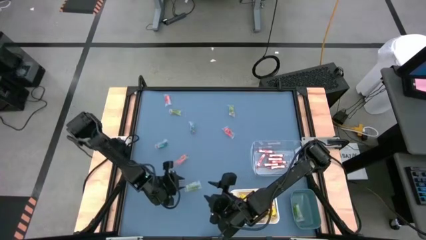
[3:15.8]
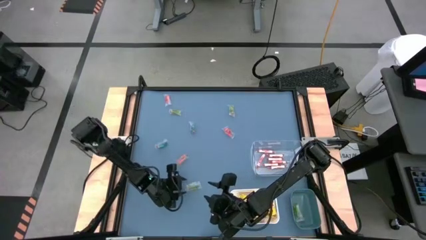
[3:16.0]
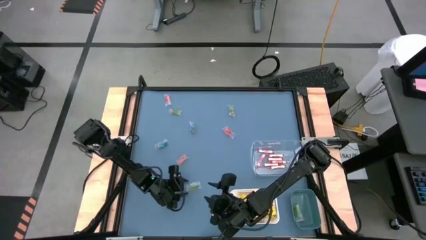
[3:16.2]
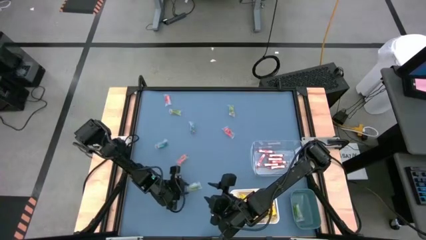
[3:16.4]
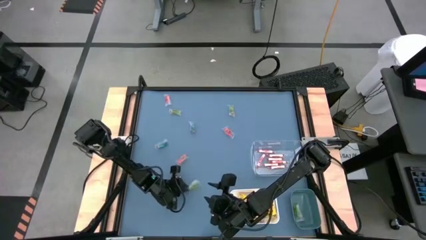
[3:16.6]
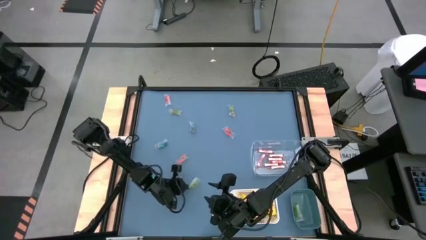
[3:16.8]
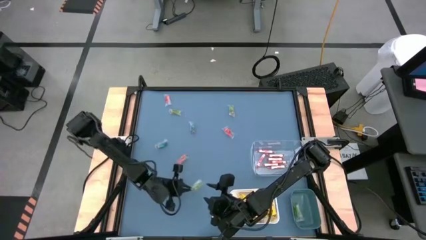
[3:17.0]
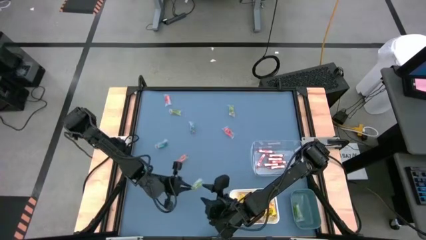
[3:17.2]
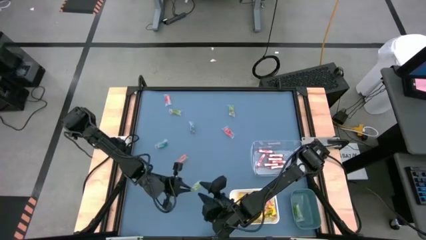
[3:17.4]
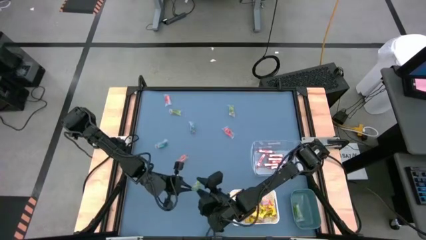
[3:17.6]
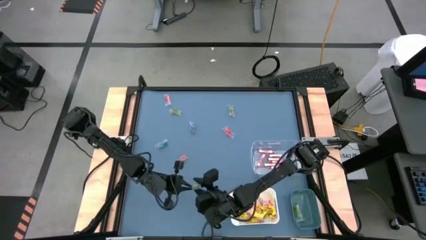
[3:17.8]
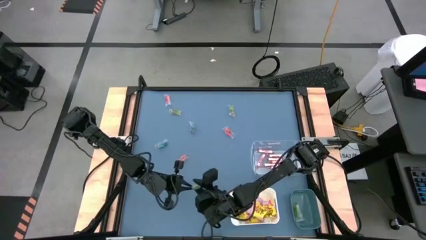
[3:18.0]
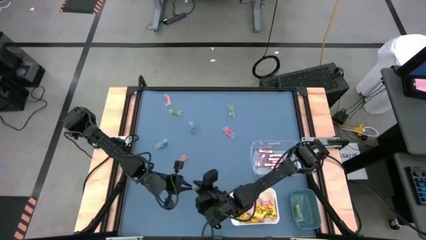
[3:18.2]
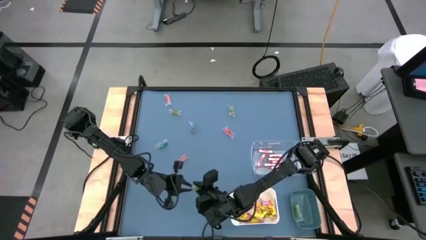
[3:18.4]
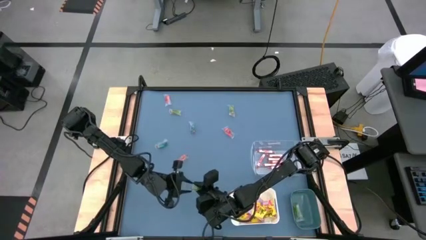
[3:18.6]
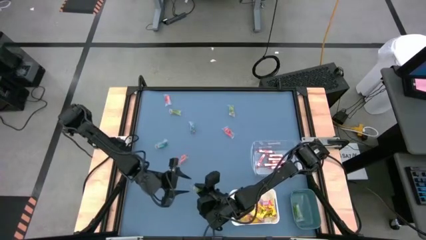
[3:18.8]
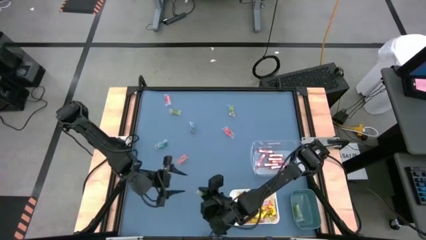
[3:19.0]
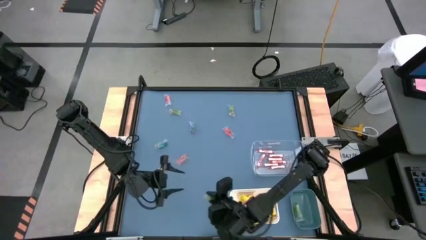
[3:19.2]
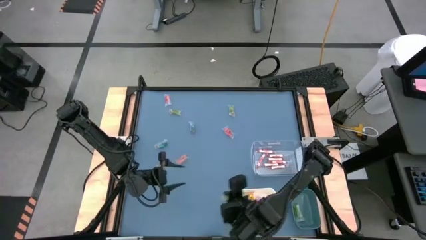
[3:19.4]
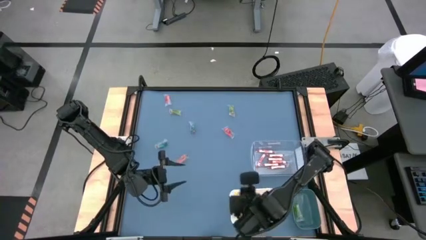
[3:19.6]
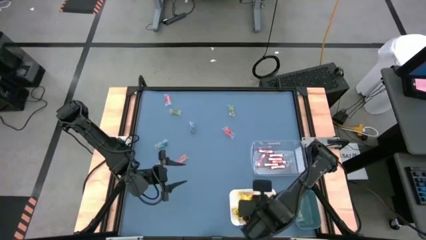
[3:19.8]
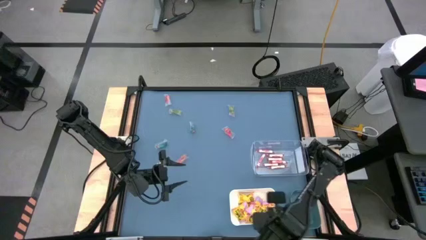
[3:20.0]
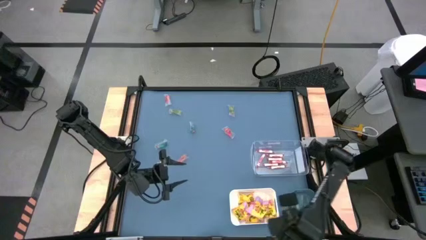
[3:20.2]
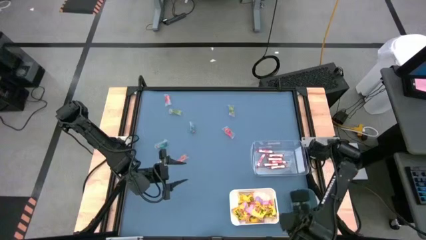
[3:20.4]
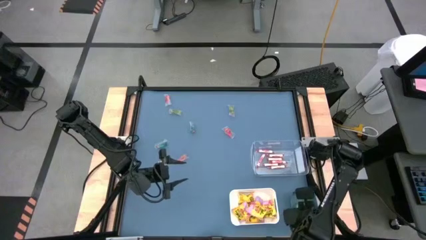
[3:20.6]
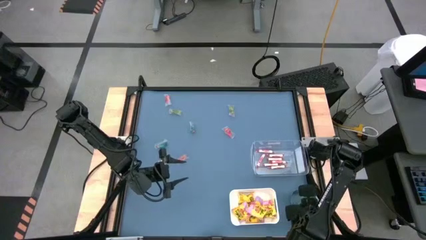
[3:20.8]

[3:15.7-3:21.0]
Task: Sort candy
Put the green gummy into the blue bin

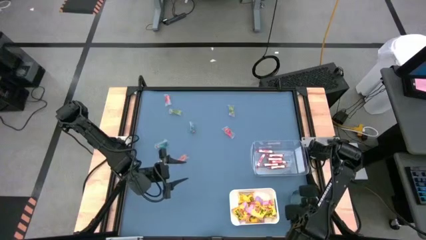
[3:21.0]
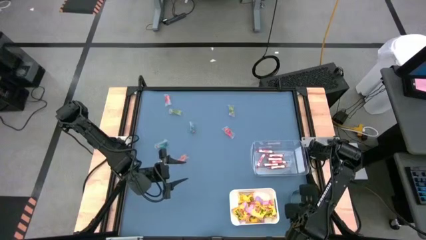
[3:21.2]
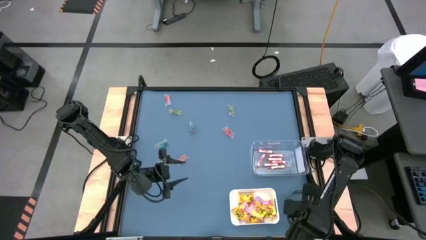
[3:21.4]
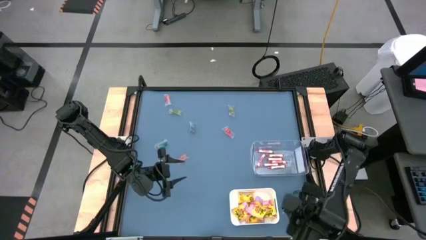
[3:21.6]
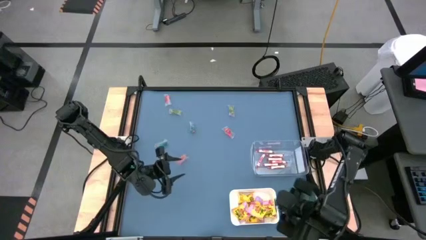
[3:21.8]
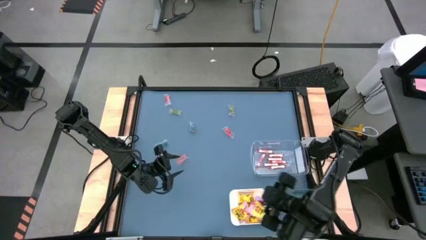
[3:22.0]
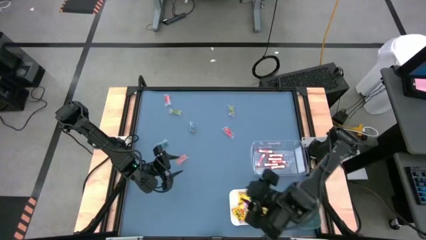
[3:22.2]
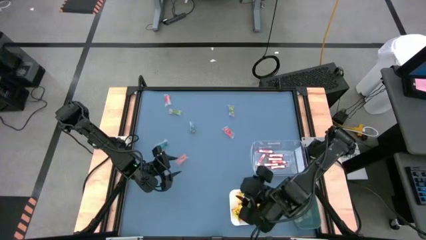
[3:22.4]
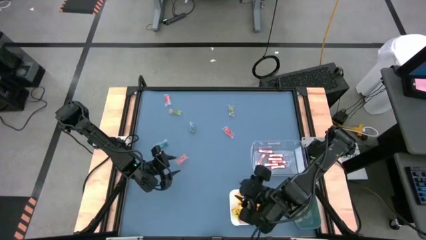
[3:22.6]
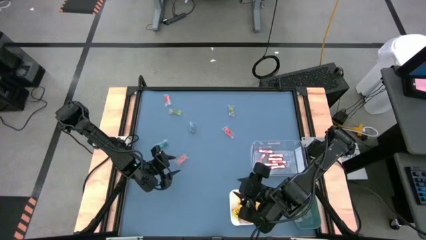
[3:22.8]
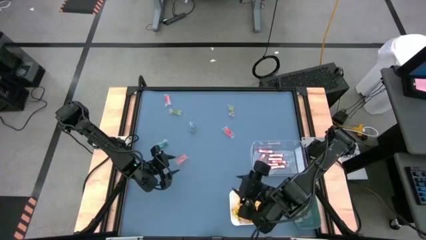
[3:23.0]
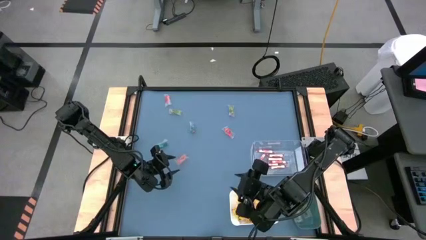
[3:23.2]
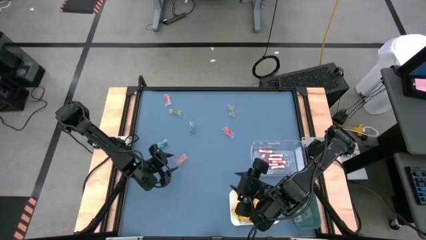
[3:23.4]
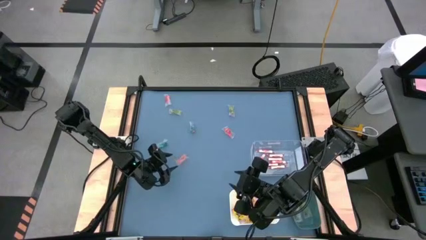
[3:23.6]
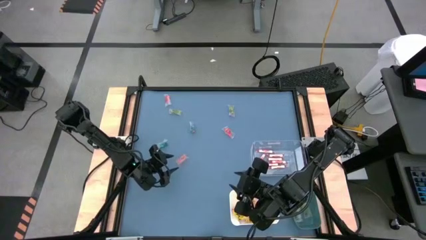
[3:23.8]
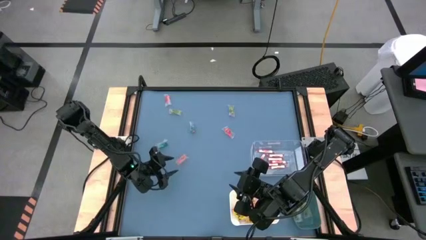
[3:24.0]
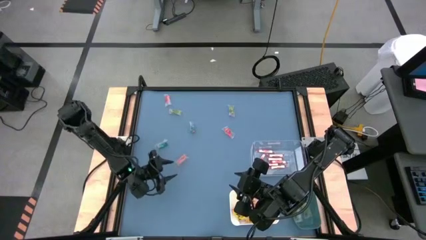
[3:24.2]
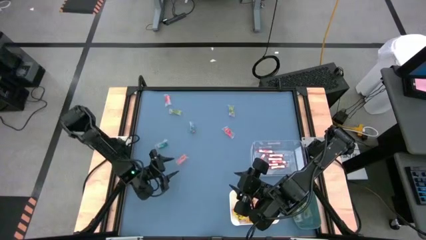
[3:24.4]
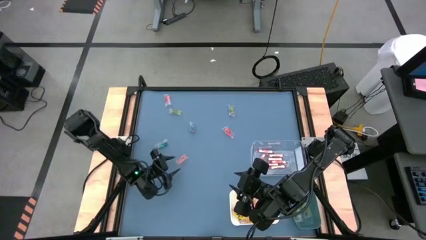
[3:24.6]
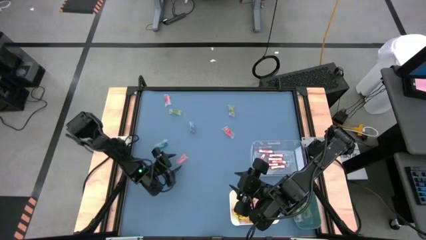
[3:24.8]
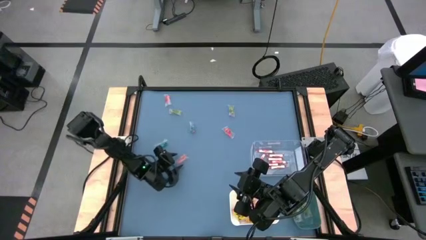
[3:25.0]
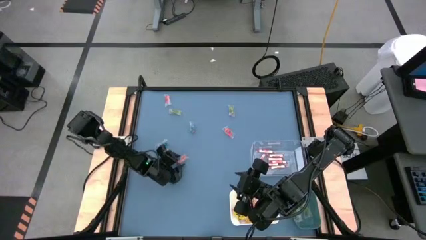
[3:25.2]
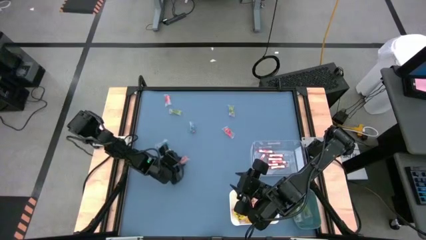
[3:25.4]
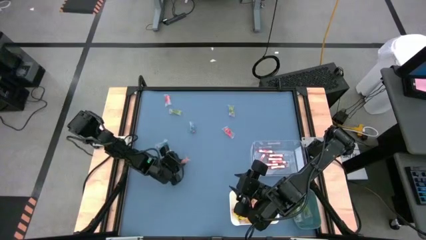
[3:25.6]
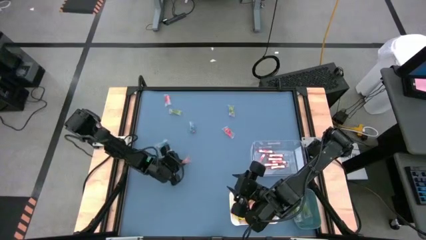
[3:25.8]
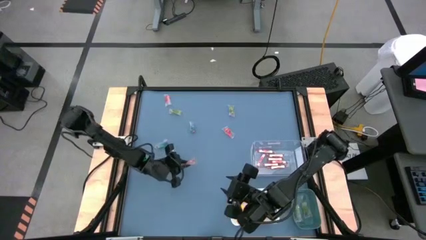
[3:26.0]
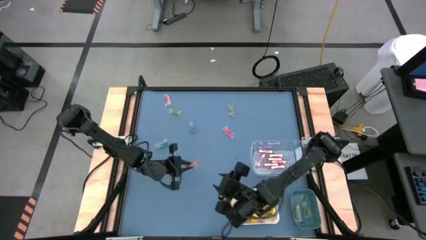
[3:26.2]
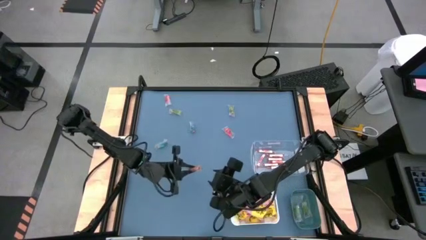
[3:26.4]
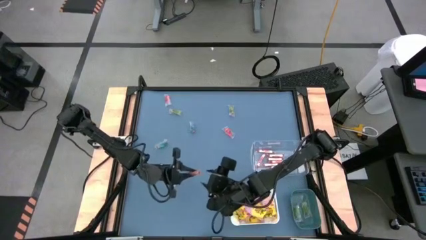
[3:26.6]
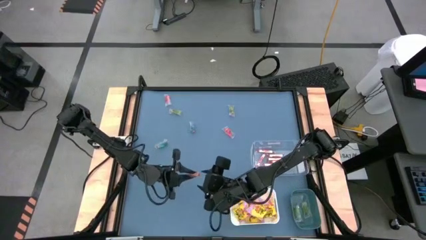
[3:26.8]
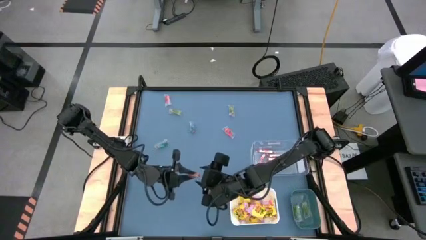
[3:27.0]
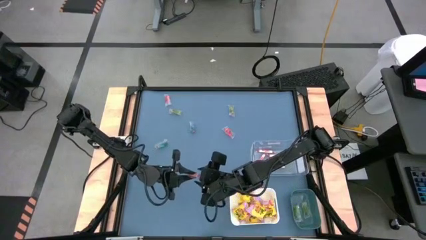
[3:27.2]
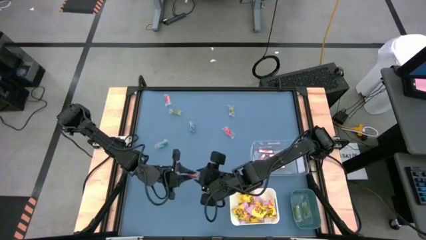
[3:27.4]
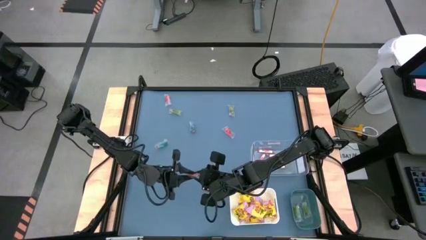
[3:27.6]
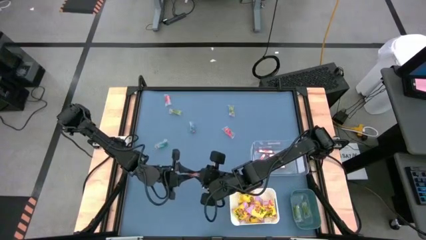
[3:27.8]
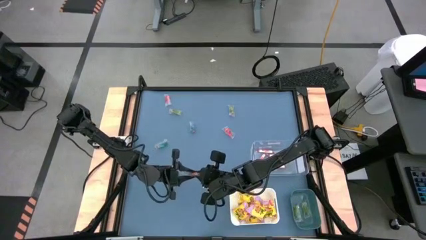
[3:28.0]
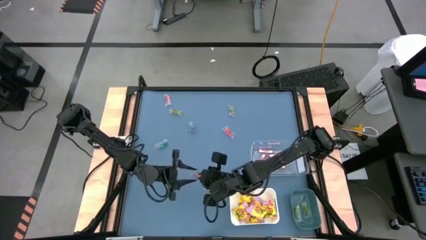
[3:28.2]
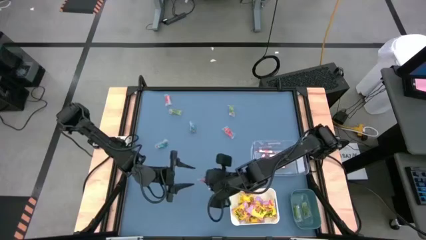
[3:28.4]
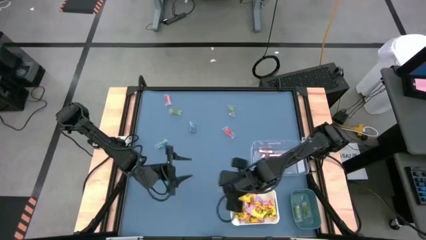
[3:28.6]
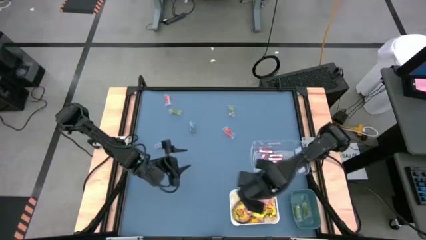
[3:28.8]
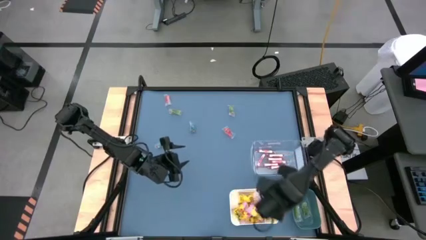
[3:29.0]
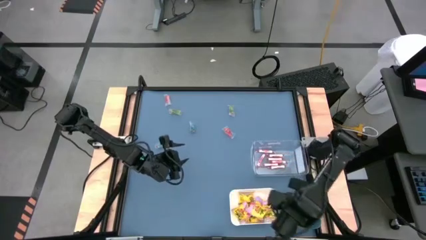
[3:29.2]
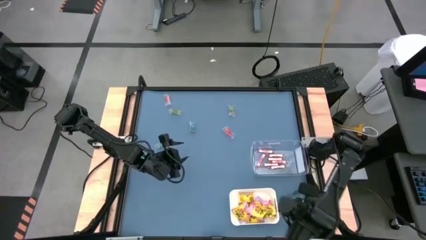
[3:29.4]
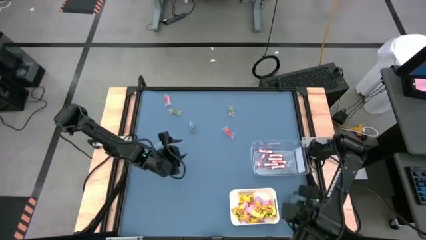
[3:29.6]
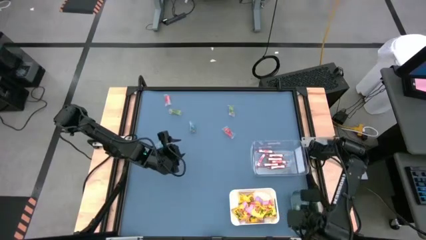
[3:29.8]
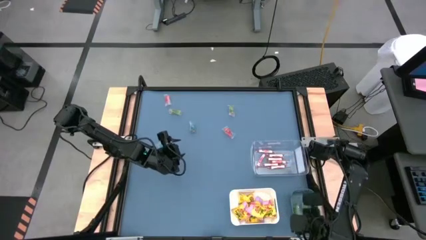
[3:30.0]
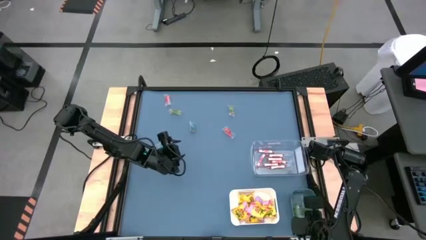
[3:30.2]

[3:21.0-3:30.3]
Put the orange gummy into the blue bin

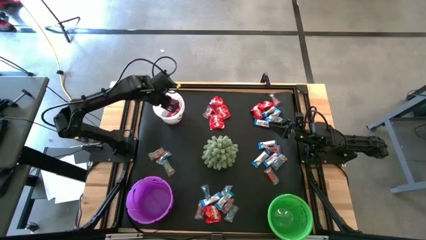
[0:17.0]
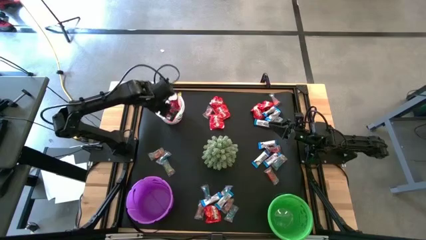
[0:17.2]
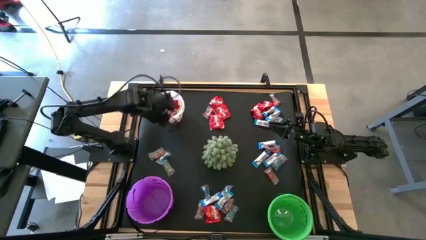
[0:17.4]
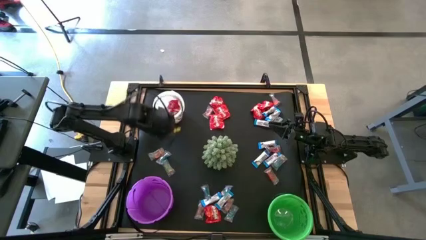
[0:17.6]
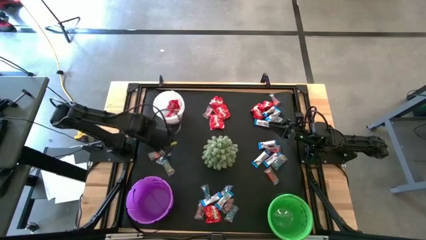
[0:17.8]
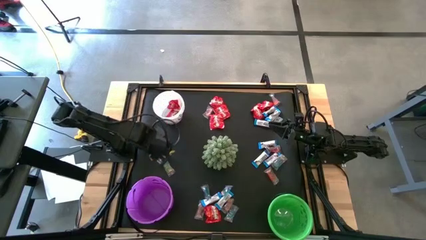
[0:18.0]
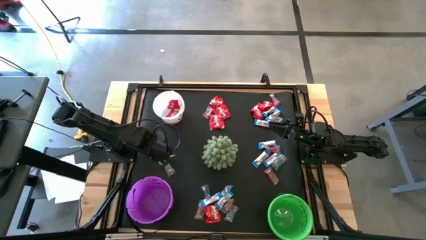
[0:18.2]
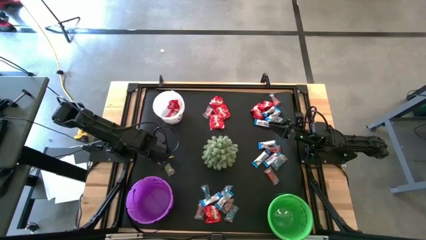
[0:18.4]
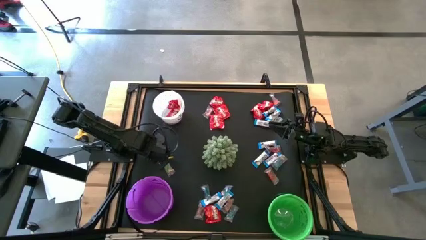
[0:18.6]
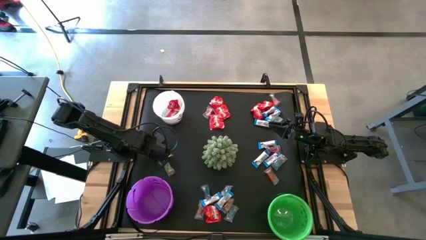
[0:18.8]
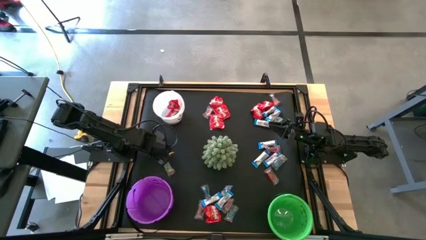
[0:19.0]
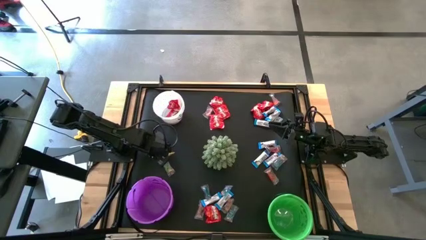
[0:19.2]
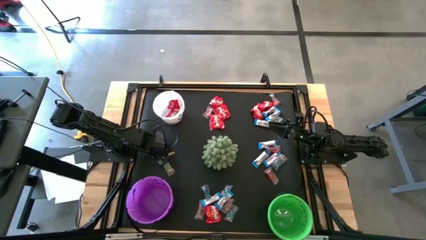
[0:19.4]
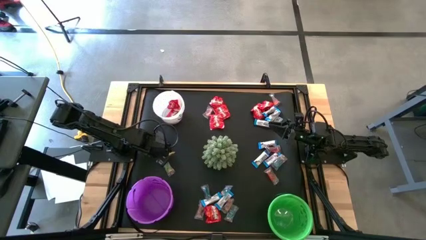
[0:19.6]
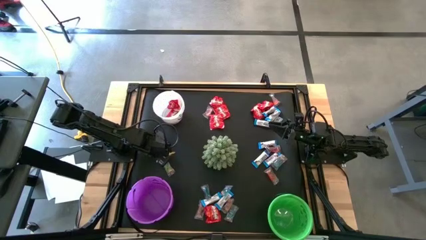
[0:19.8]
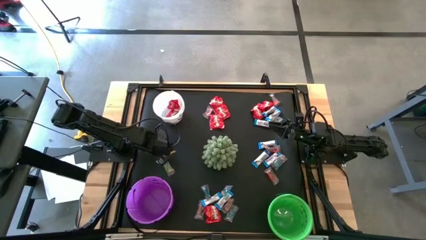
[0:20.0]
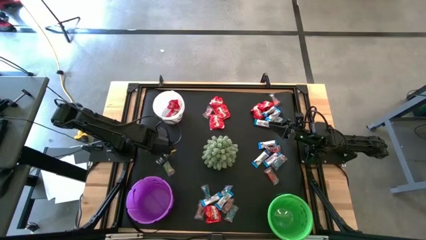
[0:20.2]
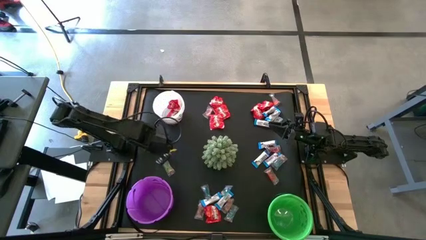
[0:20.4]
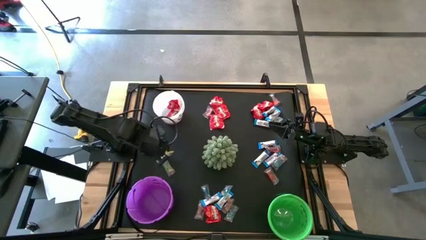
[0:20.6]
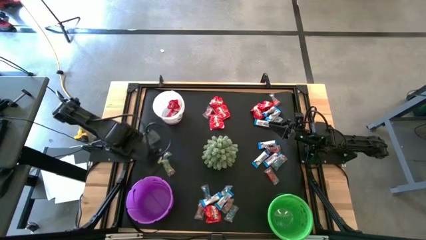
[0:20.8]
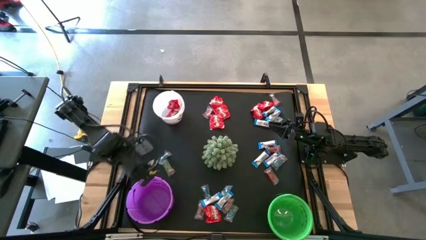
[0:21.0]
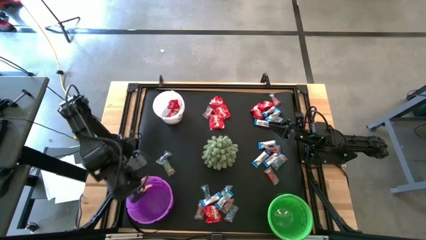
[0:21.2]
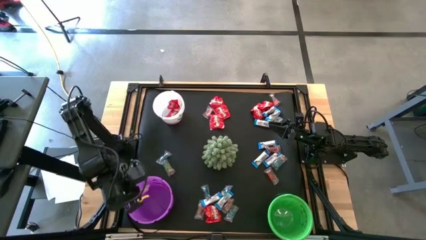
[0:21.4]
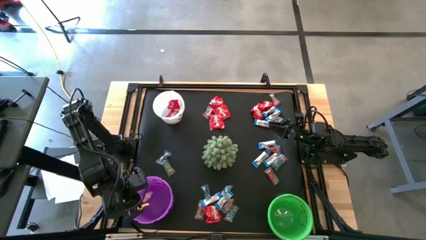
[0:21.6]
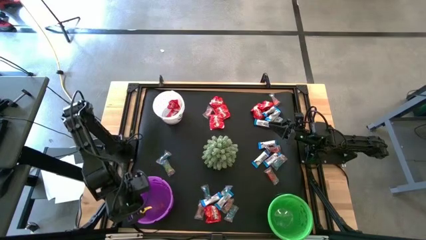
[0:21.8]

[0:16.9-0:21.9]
Task: Organize candy in baskets
Put the orange gummy into the purple bucket
